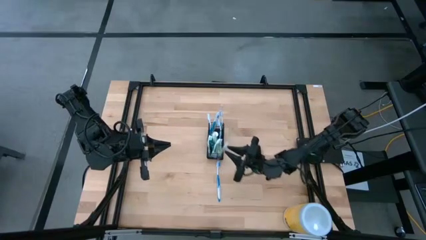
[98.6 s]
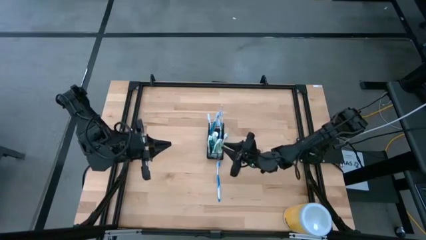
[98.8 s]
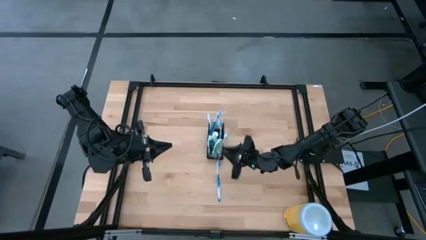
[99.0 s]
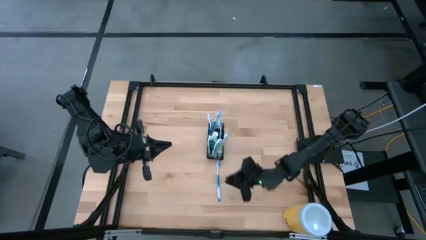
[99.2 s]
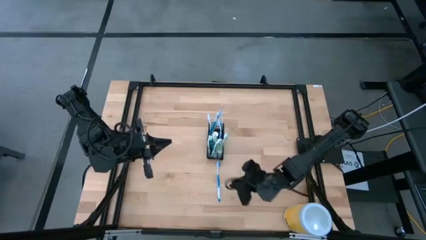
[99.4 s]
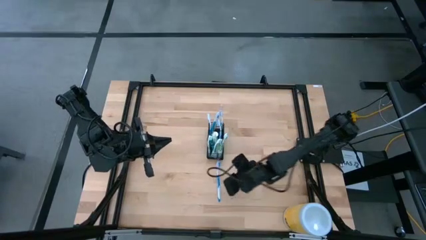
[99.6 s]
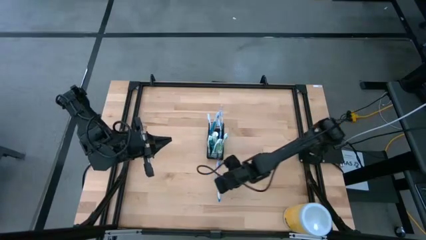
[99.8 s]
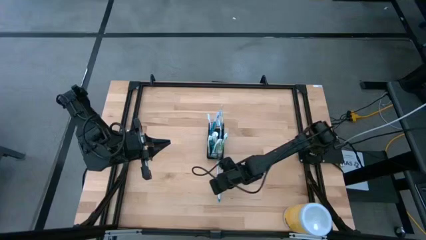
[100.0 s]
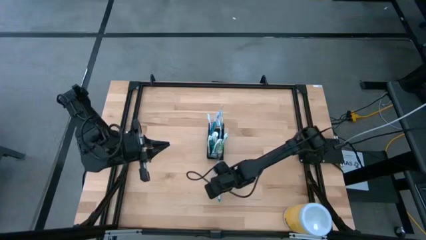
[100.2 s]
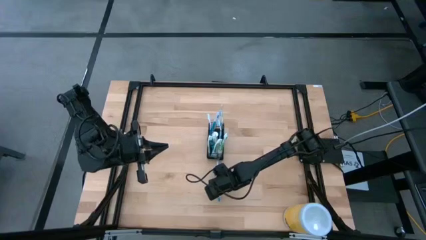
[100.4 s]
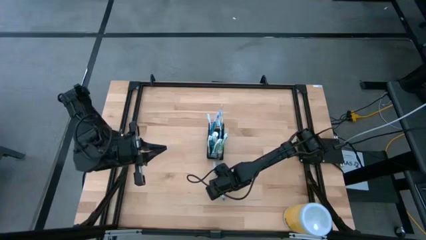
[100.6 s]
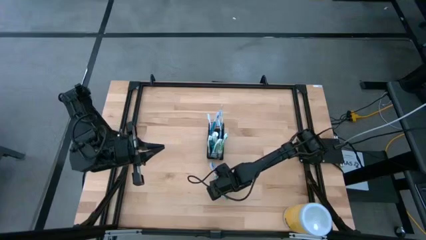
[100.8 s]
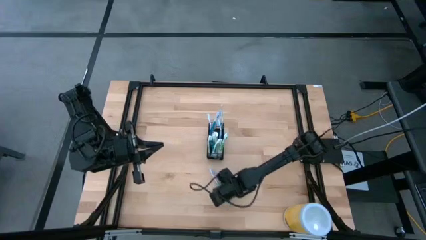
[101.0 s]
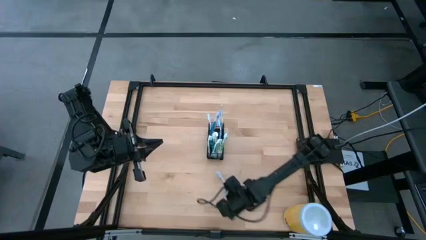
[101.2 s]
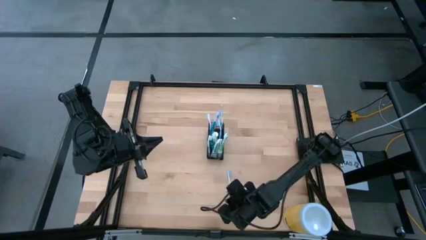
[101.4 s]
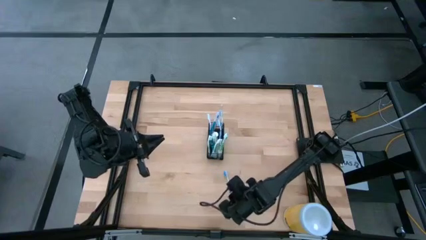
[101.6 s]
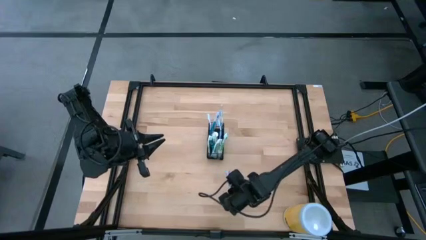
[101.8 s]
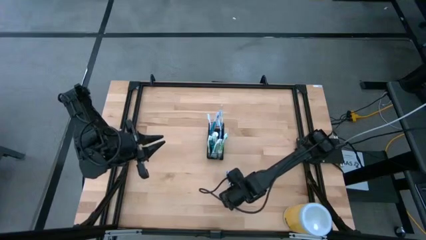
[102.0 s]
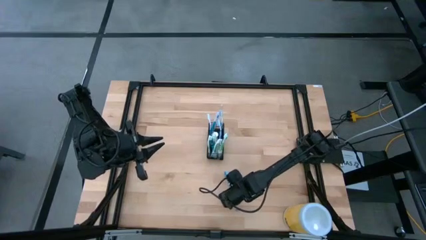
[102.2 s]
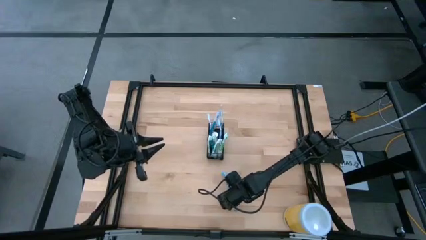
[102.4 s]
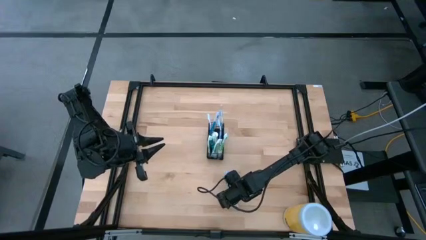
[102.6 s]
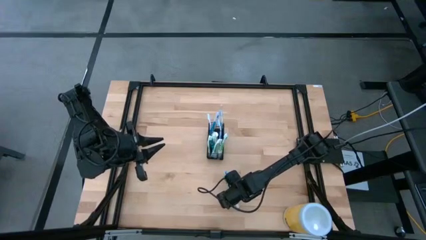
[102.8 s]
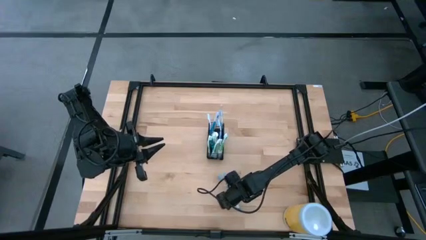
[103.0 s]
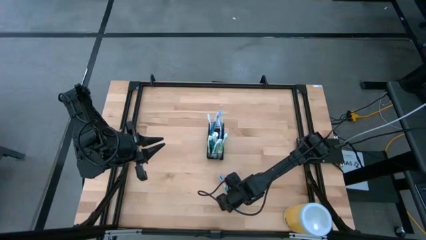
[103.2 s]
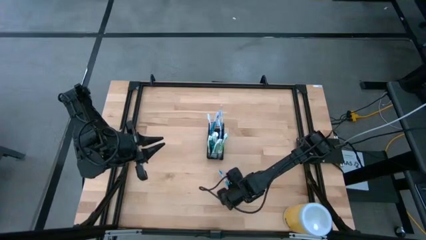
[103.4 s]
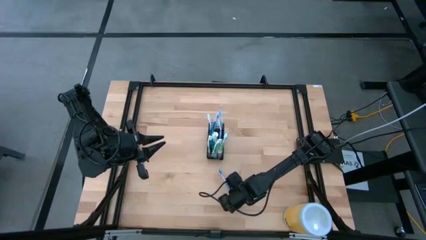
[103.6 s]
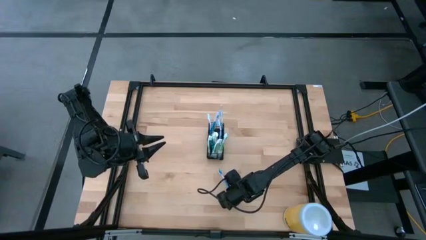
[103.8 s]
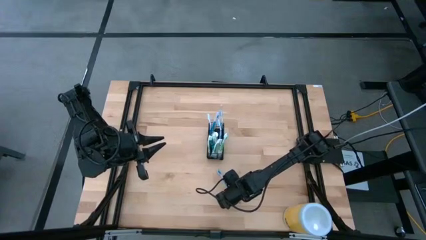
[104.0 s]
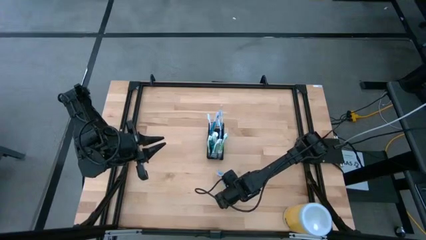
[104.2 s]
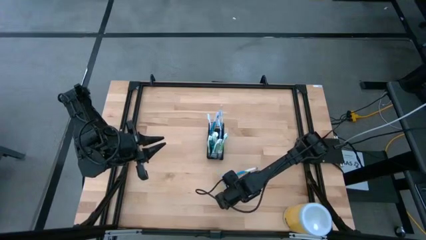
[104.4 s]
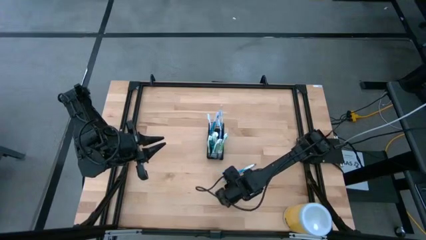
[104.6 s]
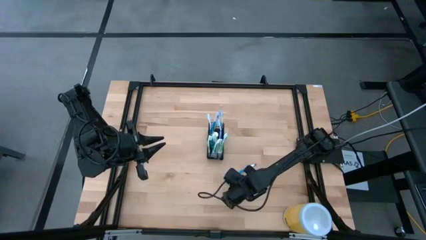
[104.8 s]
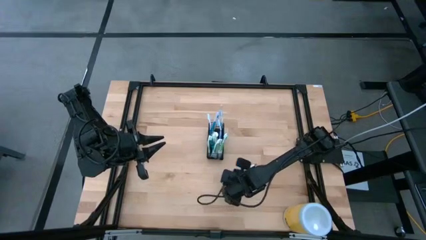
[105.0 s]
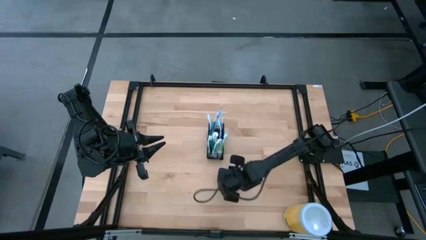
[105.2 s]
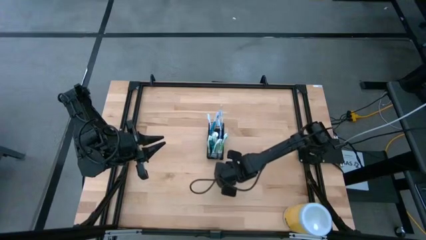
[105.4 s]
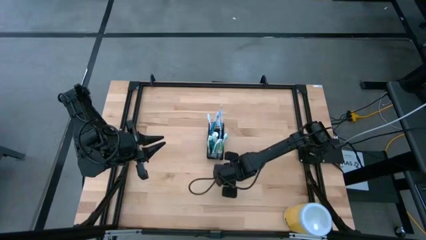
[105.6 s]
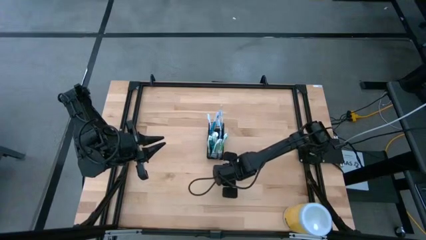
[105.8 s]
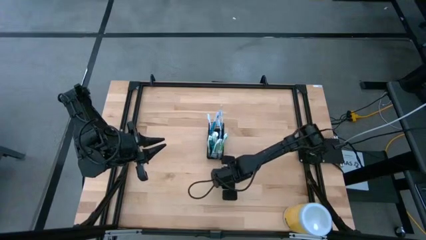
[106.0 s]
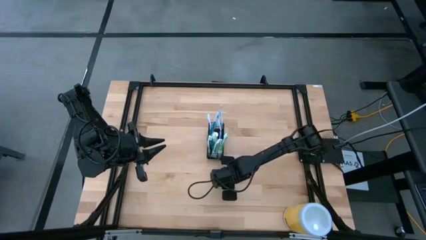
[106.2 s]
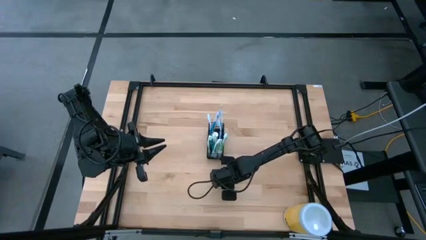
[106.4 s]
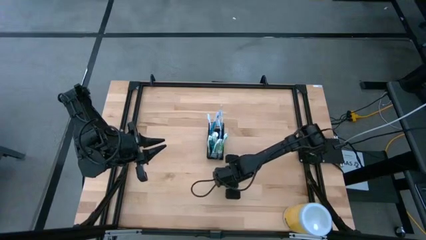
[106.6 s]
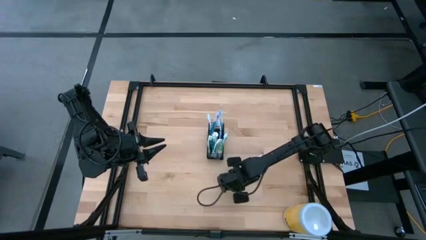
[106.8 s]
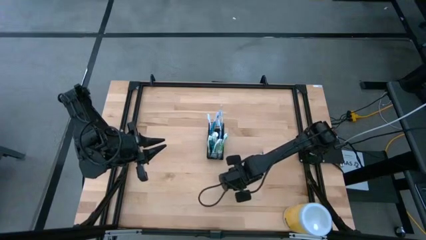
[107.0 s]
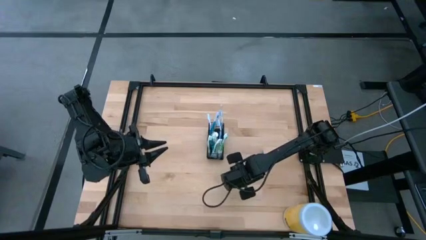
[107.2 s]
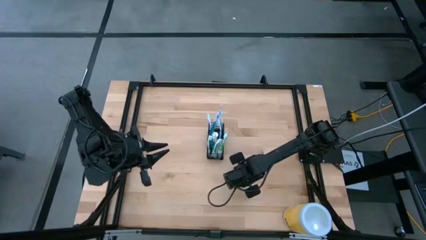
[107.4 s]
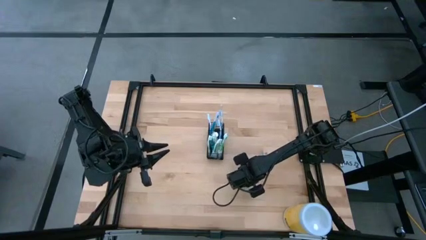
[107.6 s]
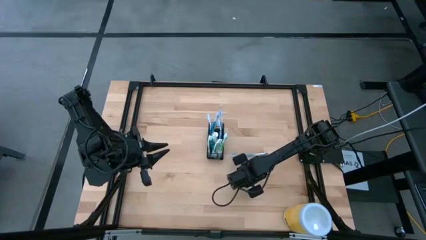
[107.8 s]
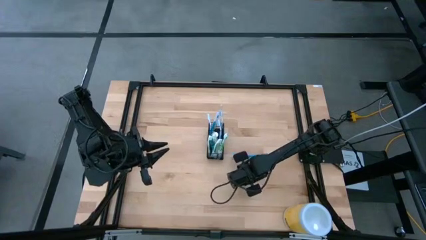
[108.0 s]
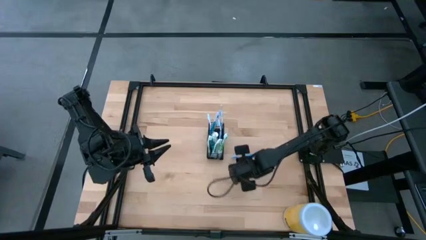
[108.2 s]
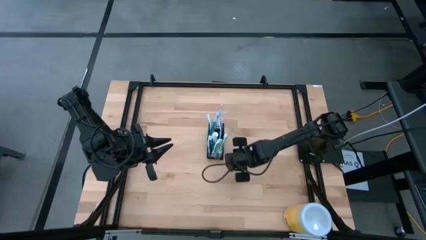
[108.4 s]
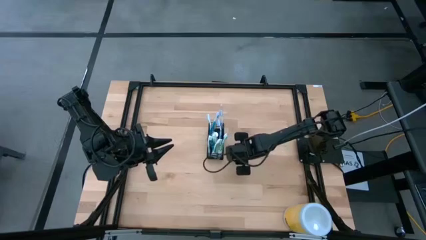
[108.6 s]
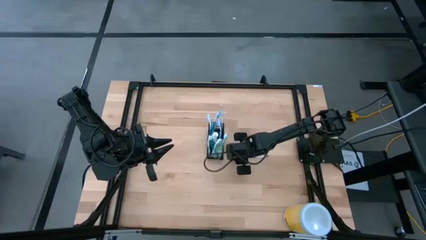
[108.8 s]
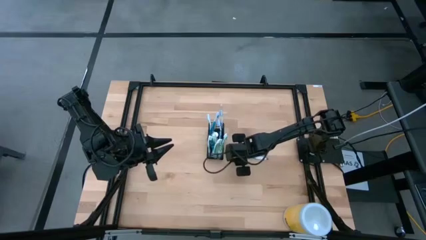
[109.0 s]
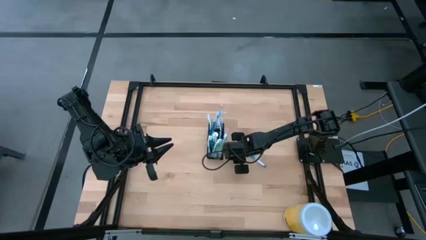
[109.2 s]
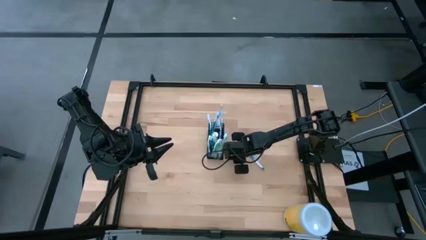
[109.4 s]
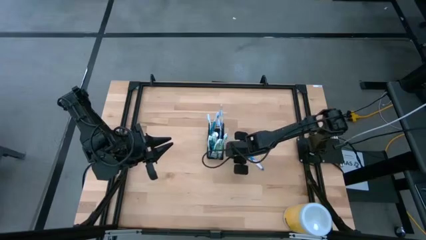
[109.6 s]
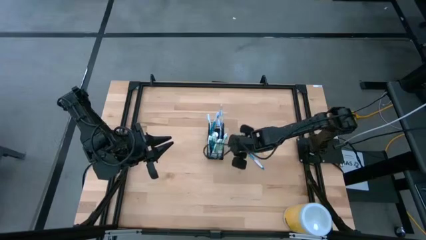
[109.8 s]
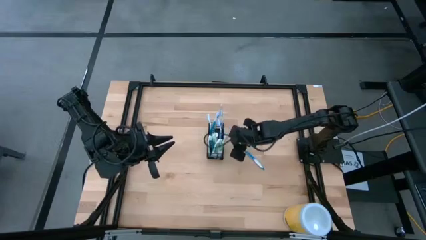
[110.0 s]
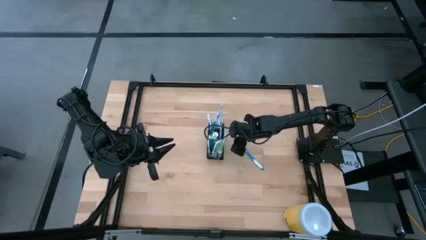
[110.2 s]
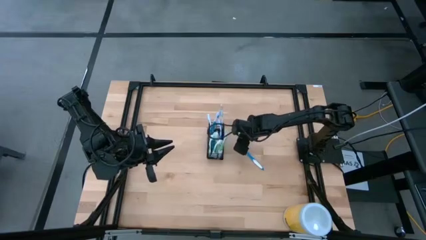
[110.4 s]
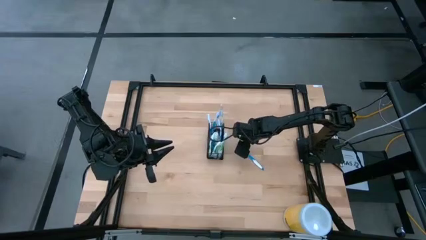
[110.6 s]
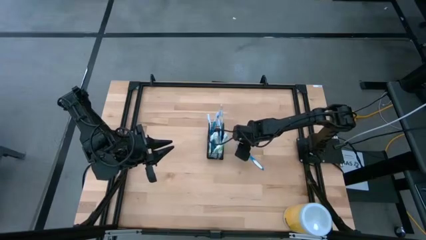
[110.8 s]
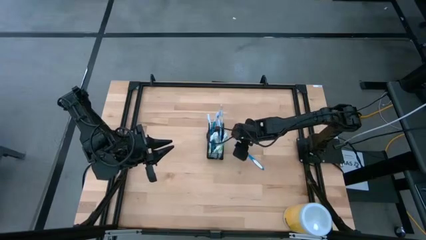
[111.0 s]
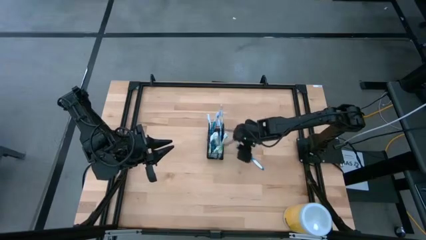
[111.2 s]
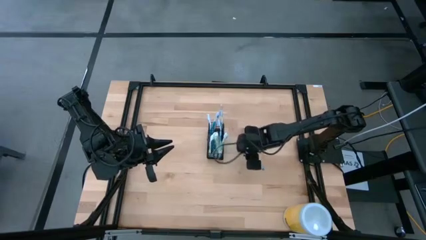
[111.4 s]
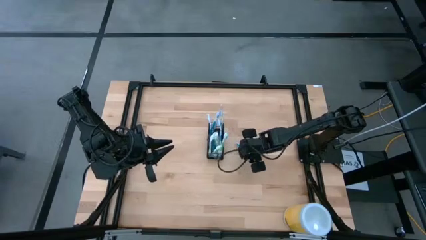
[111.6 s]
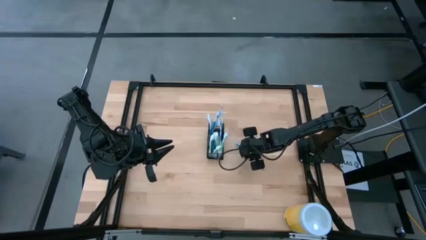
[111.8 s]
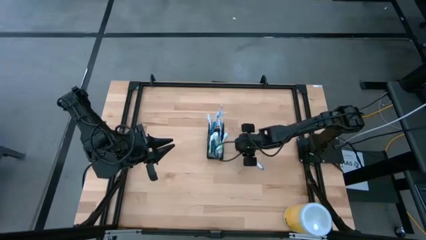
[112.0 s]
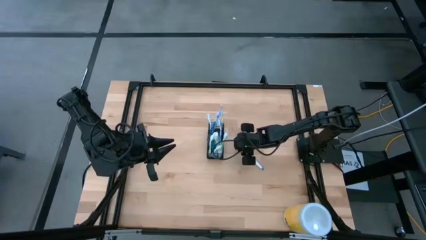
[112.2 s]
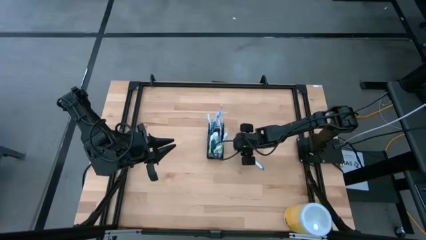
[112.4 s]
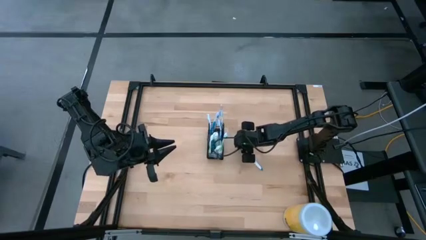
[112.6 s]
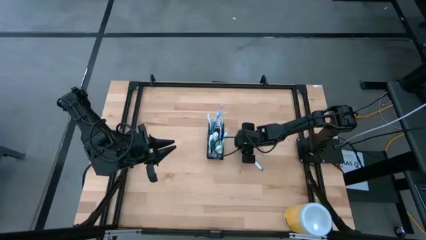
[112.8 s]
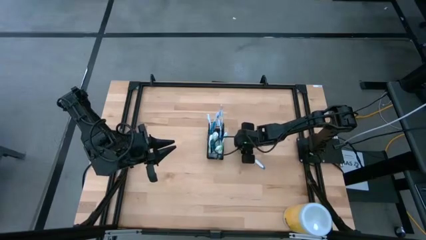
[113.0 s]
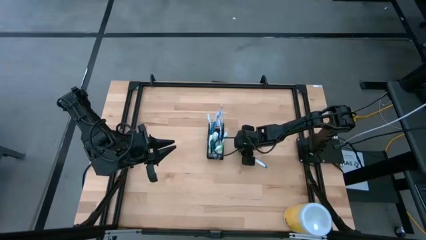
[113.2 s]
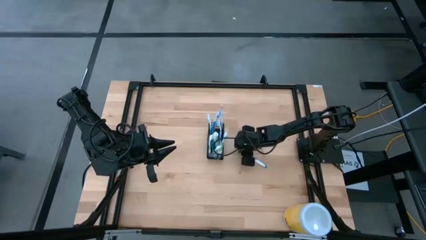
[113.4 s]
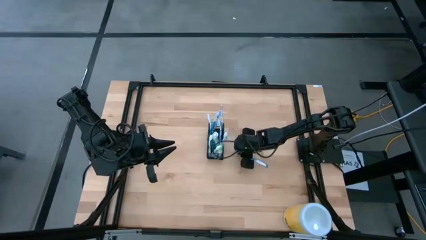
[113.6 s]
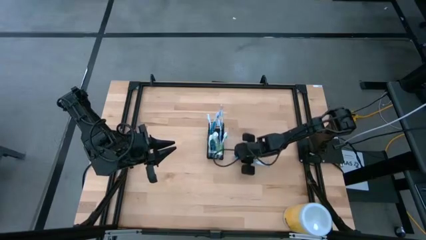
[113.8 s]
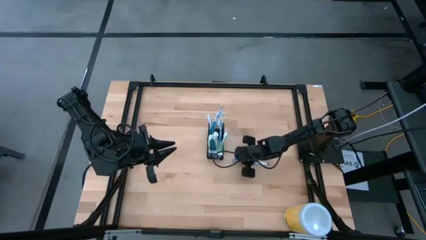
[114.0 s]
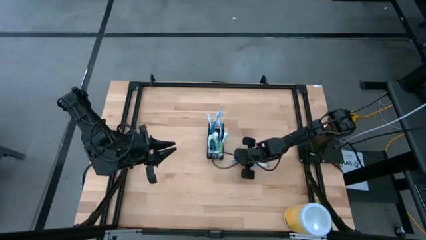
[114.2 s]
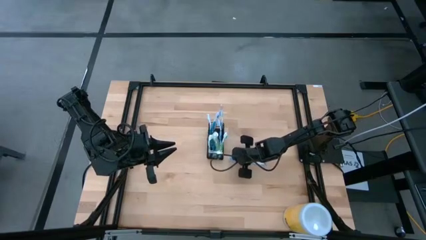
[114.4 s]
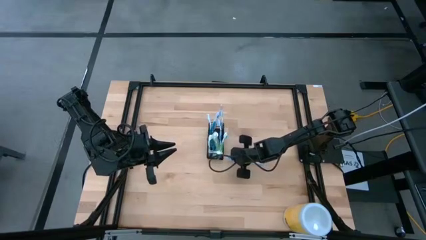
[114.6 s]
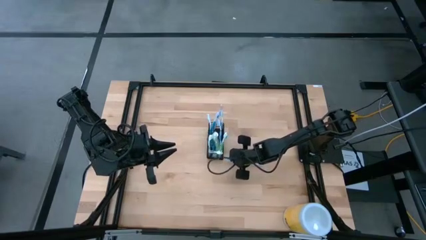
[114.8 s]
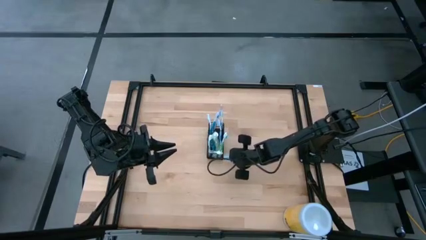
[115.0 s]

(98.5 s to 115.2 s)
Task: Pick & Place toothbrushing station
Put the blue toothbrush into the black organizer

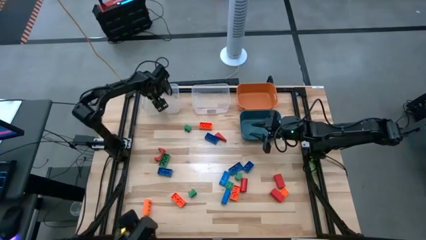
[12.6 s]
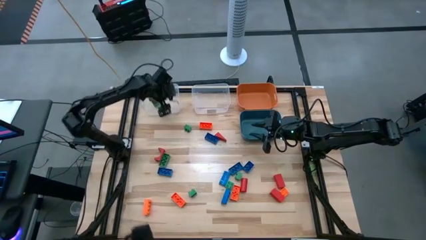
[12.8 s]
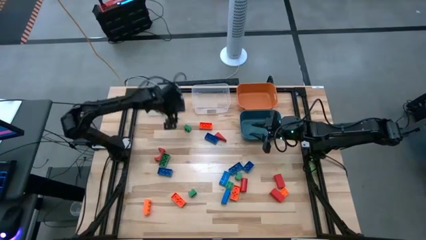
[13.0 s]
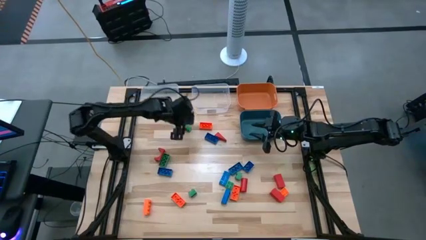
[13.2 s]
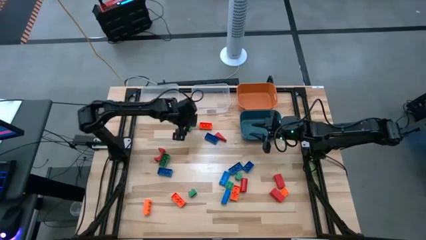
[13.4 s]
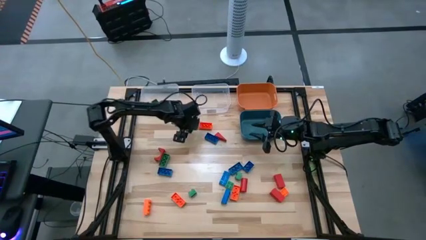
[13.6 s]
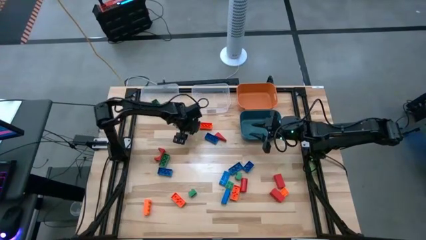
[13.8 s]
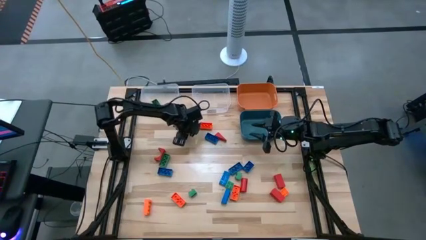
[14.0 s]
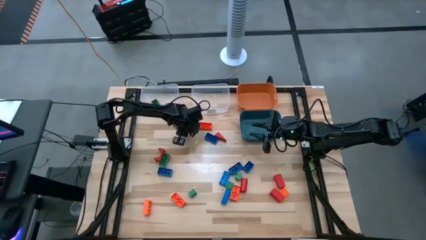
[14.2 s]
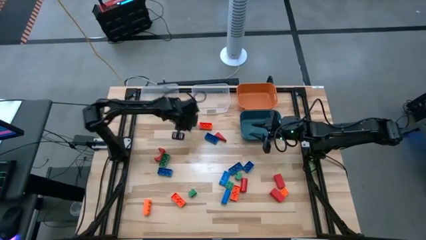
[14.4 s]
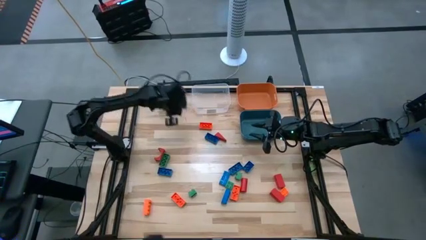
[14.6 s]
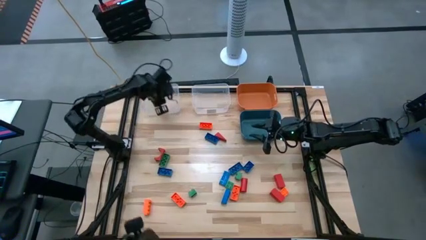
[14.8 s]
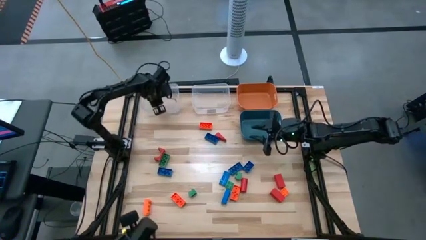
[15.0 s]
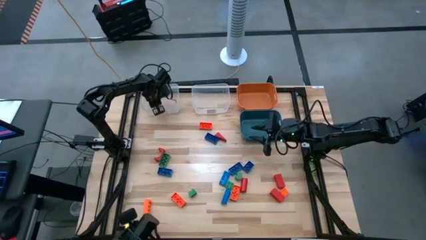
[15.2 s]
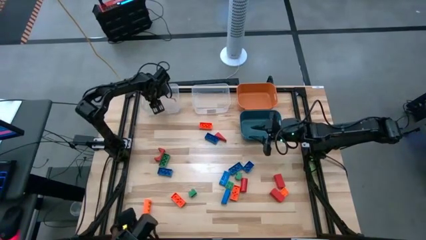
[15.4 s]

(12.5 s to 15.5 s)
Task: Sort blocks
Put the green game piece into the left transparent bin
